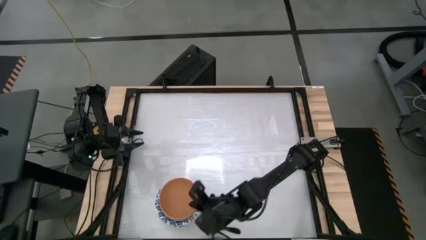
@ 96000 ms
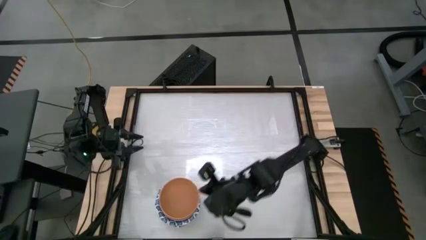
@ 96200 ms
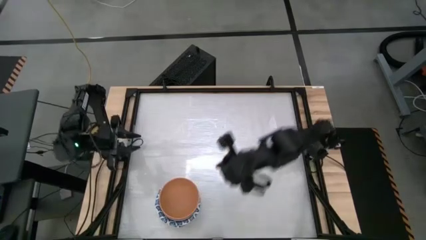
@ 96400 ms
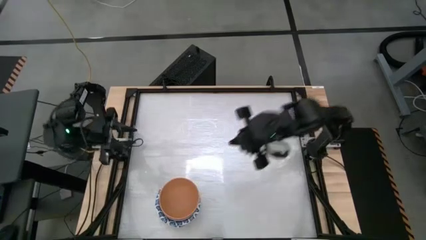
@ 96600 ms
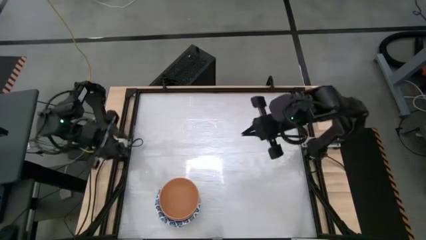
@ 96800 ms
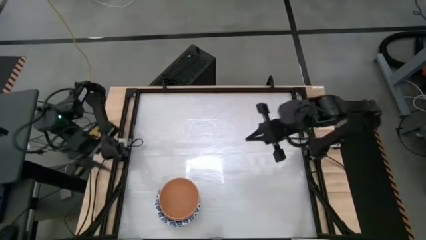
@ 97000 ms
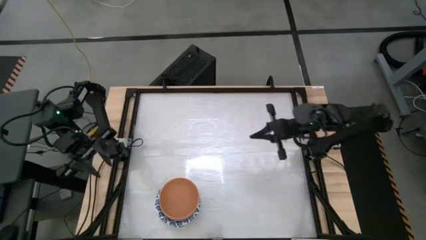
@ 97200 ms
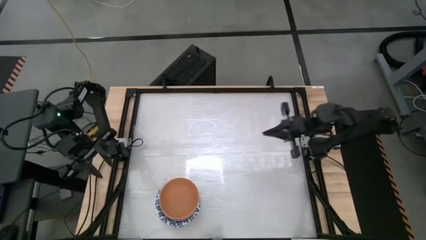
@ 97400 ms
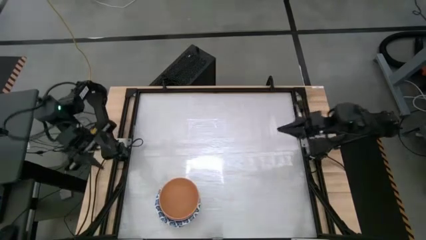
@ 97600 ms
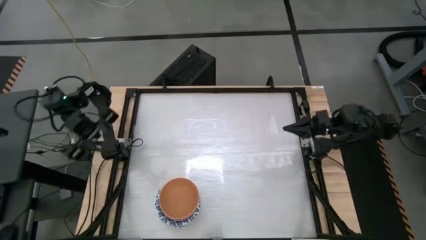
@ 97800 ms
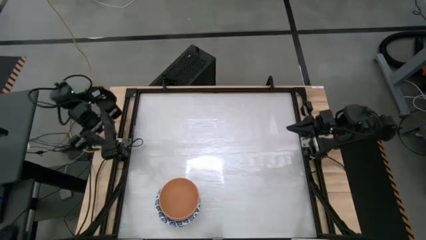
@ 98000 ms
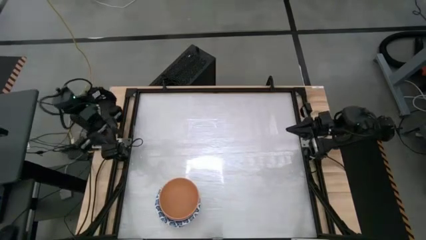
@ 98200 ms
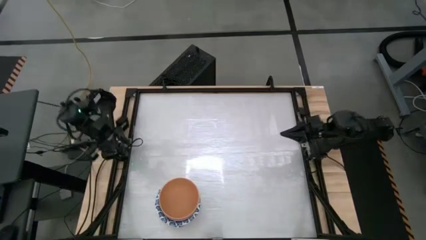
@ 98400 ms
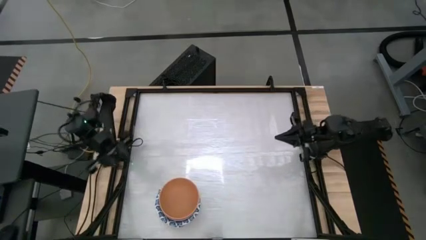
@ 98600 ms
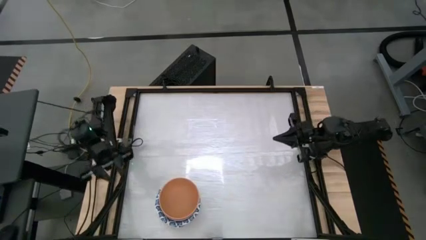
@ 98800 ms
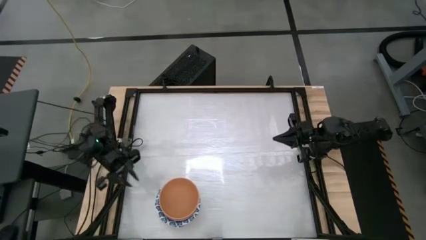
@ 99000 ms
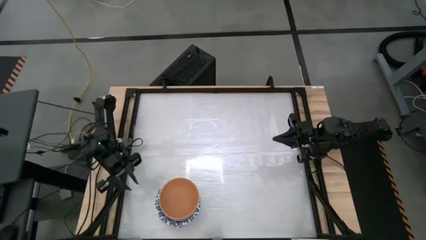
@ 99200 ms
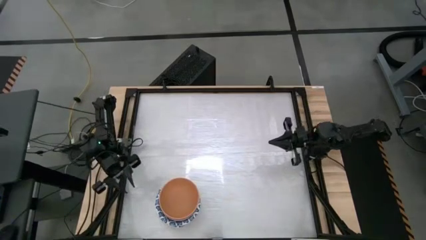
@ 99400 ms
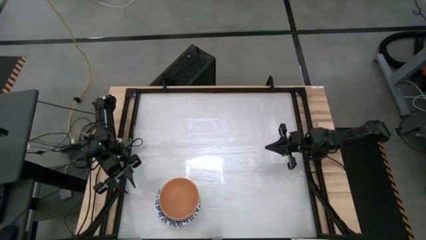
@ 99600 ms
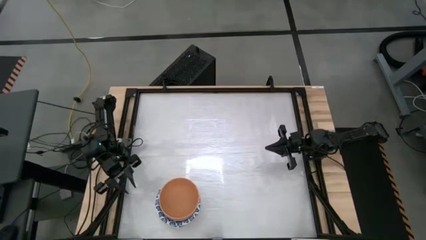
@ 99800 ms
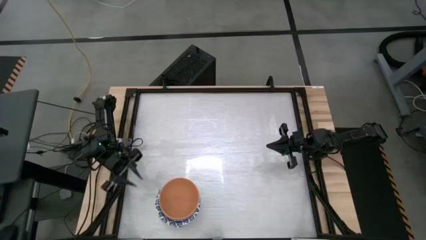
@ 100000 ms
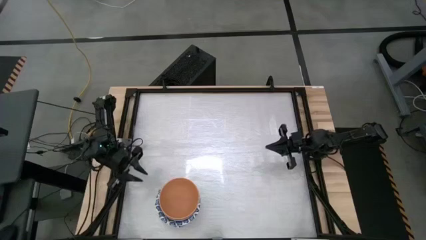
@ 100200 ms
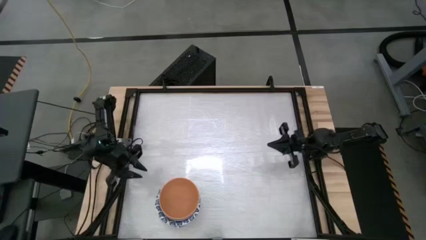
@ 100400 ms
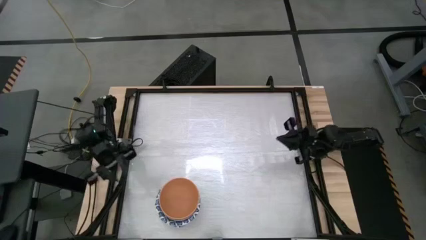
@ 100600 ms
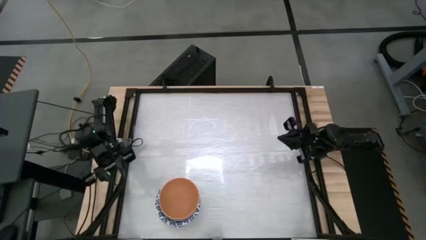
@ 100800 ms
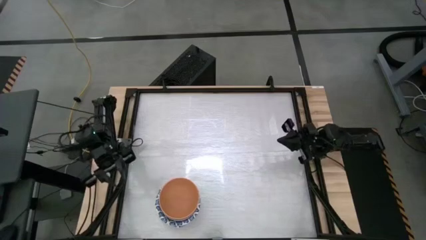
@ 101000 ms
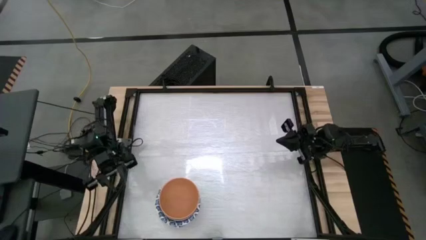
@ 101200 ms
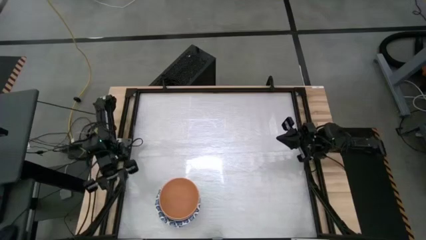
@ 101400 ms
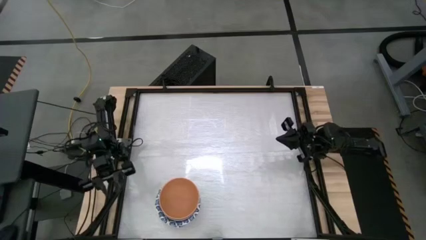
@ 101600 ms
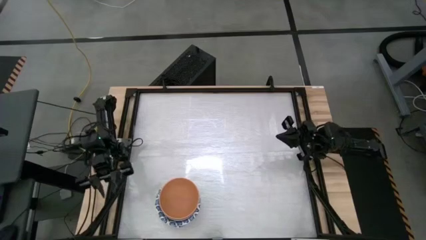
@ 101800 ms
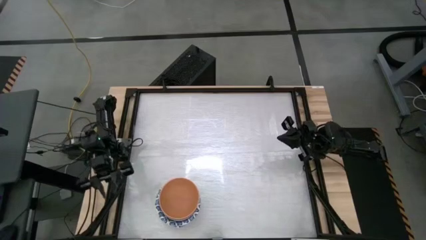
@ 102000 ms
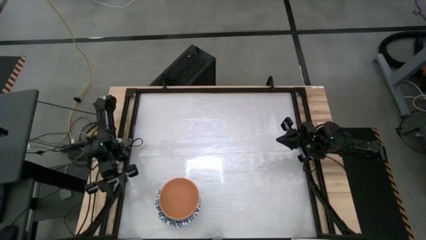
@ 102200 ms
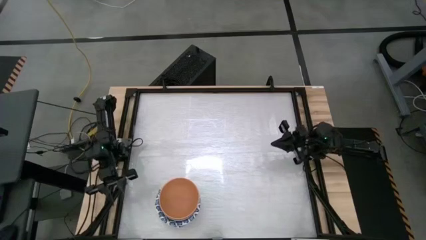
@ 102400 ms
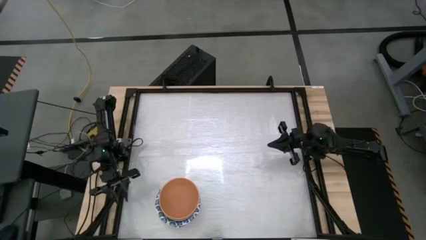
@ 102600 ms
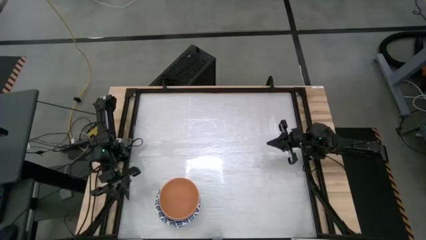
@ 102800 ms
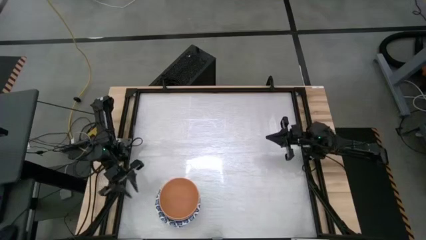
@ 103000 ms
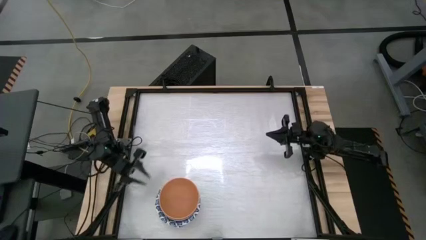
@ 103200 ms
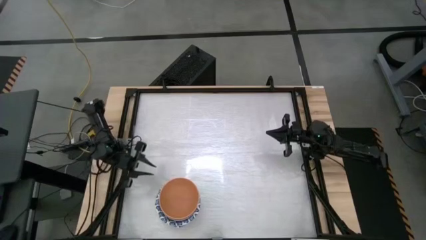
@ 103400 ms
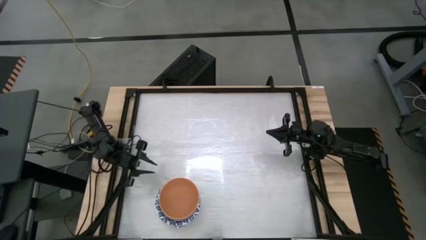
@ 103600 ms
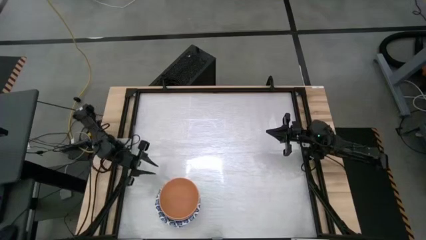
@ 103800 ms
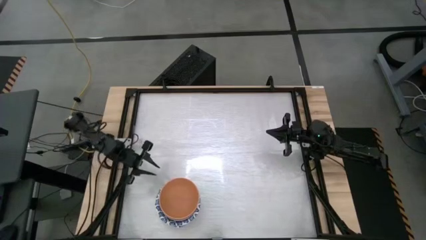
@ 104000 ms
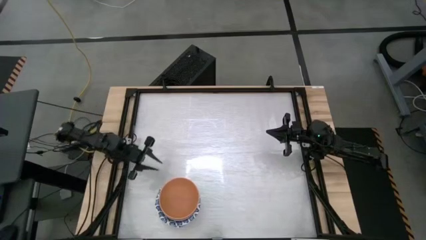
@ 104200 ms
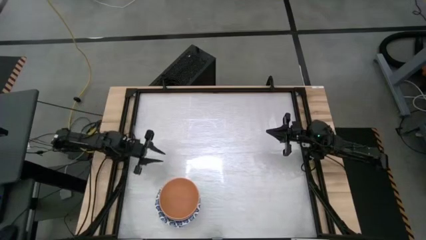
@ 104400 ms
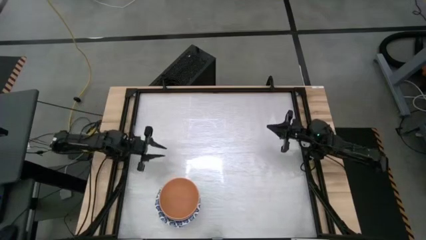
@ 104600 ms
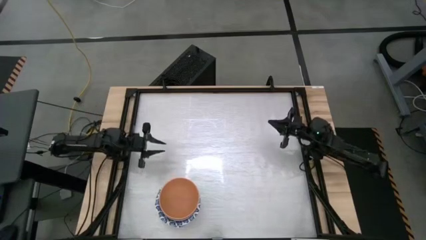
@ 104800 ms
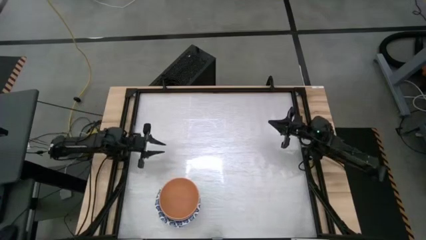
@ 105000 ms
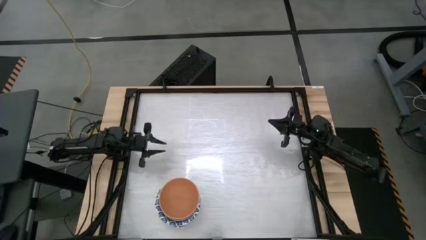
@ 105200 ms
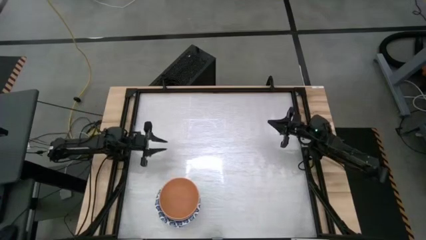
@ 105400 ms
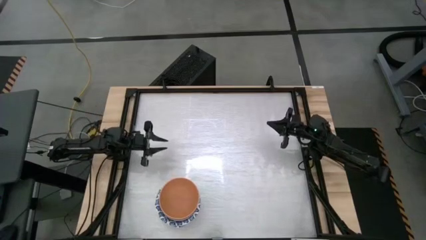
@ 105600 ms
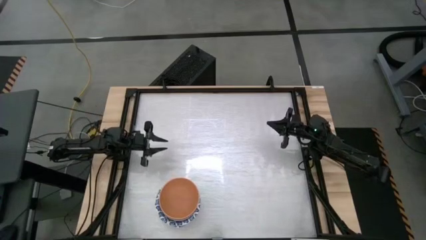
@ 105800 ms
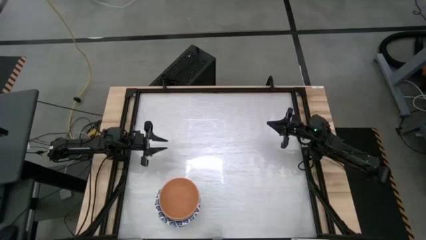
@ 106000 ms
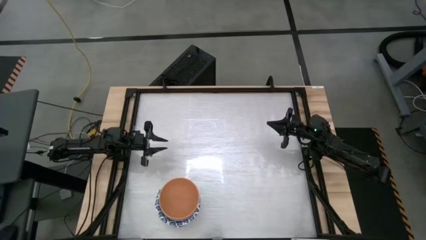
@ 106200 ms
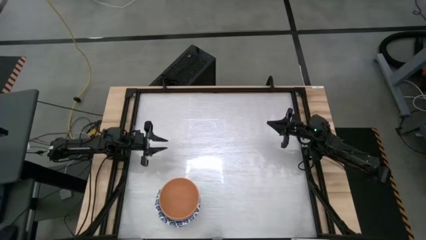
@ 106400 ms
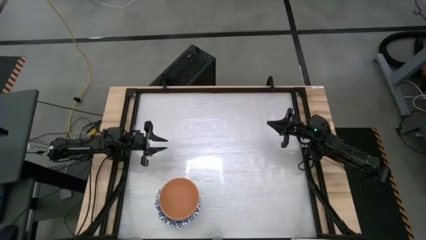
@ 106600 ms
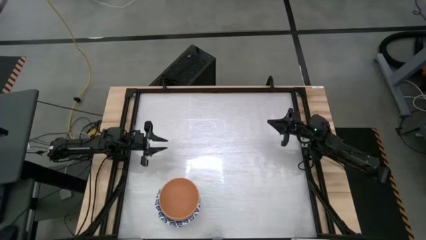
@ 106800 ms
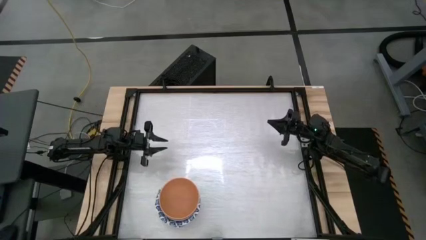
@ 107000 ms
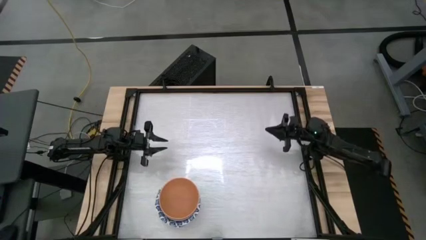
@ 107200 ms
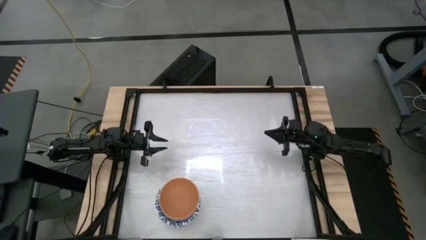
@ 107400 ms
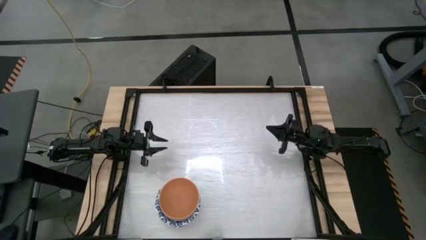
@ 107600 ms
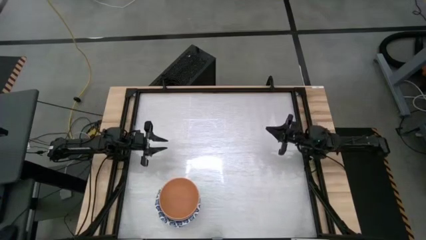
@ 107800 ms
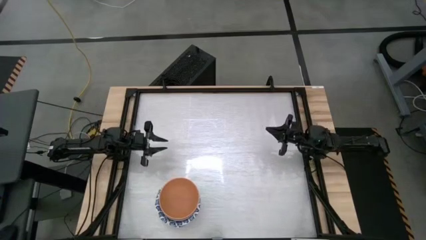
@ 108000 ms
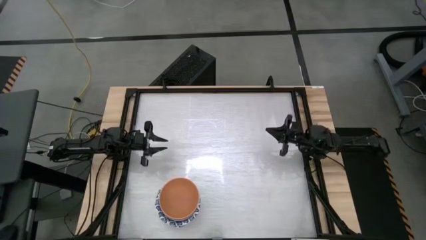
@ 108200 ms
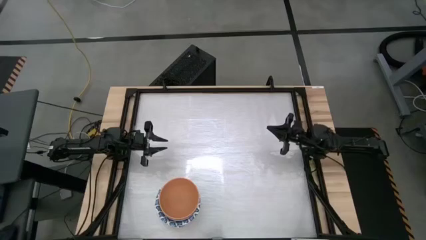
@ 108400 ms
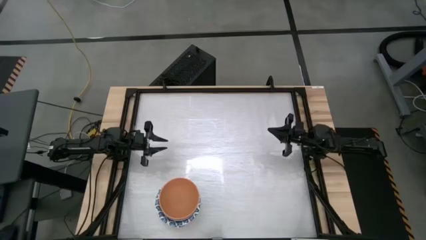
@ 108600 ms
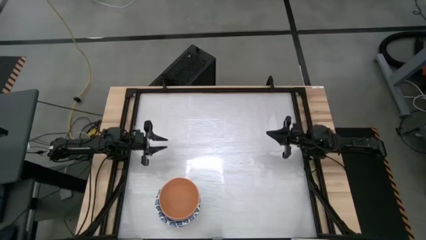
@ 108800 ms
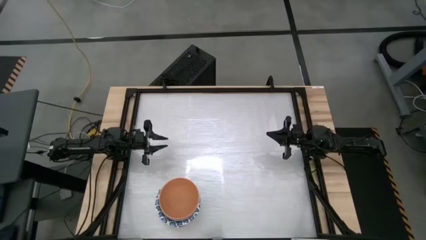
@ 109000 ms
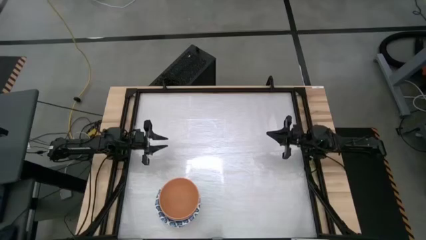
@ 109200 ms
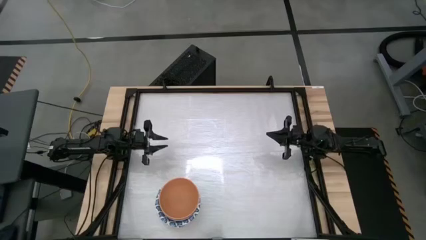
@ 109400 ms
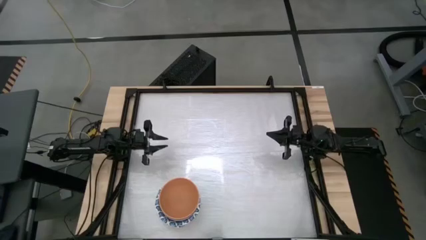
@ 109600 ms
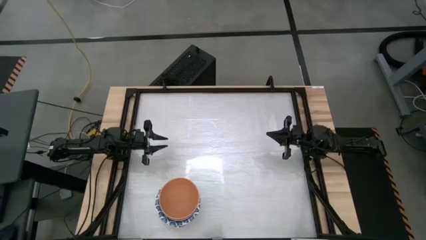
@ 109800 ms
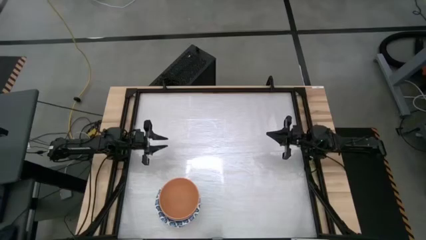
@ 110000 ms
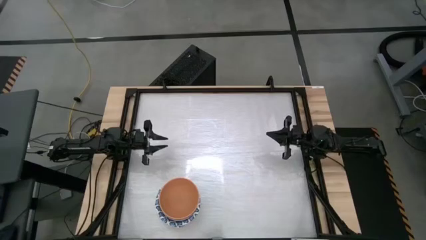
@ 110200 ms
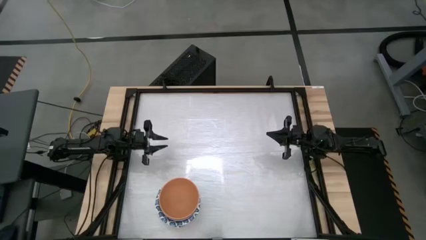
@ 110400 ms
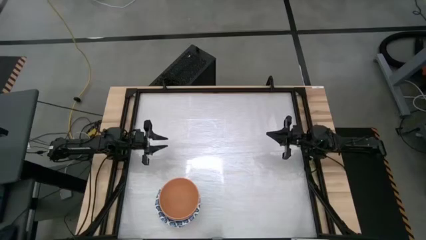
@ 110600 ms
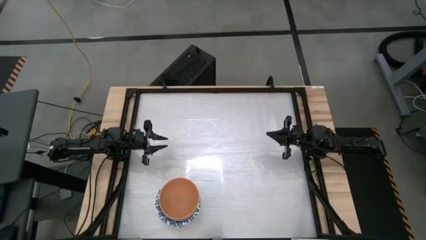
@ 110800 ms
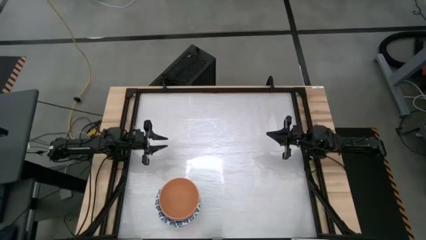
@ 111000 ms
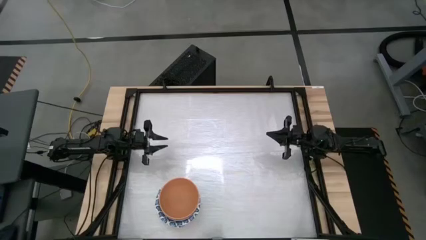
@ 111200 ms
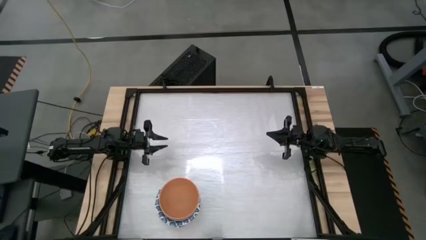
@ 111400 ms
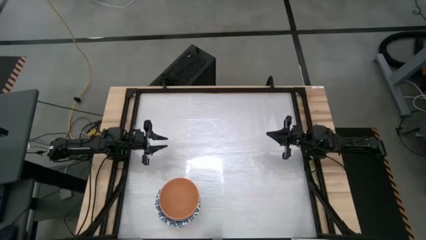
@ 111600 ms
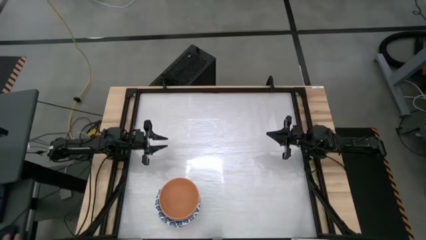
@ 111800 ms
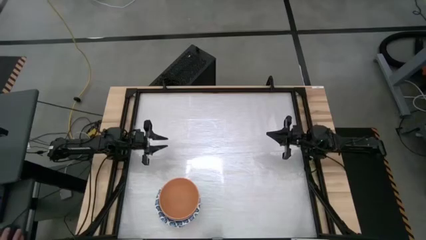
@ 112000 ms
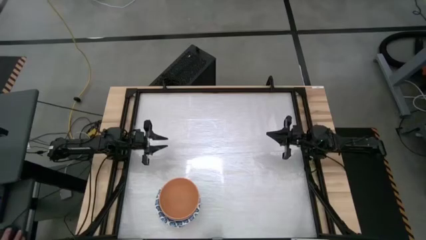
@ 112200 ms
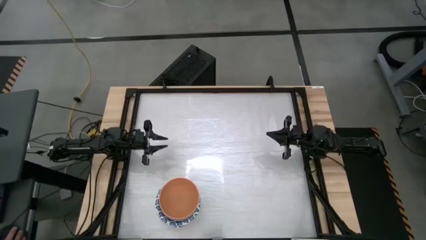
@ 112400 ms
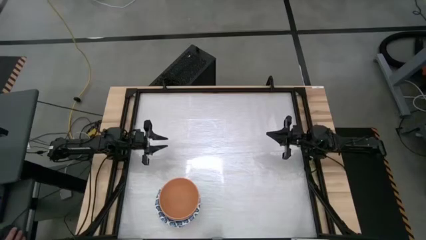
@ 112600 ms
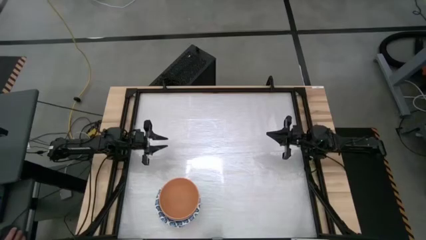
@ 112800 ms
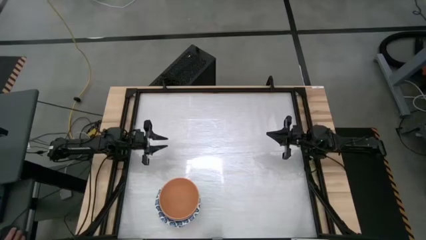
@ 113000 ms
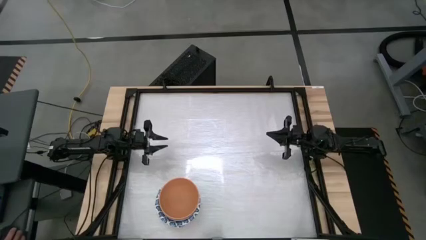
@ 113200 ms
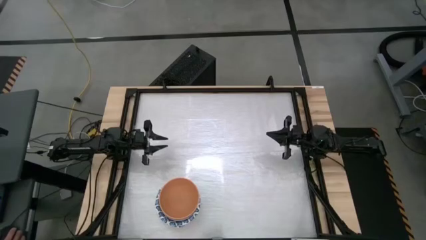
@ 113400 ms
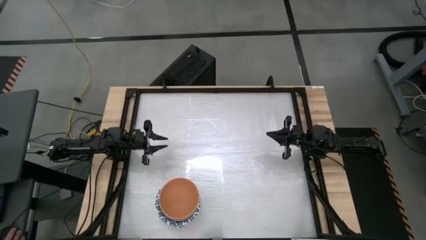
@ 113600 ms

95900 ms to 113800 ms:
Return to Home Position
